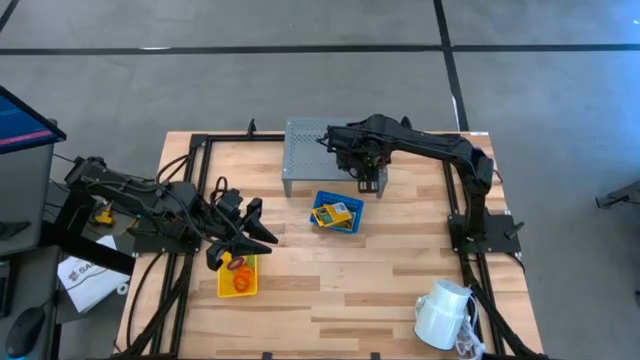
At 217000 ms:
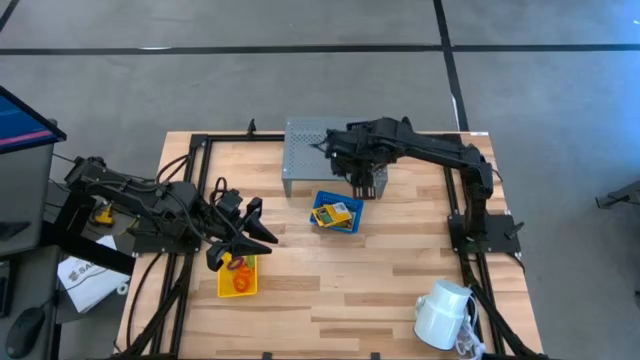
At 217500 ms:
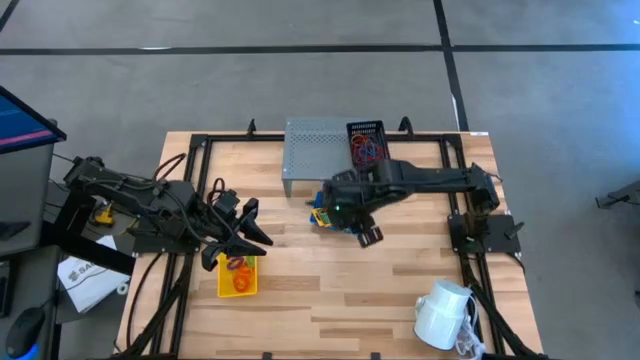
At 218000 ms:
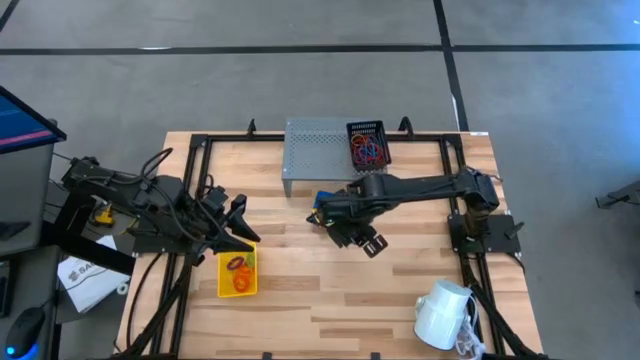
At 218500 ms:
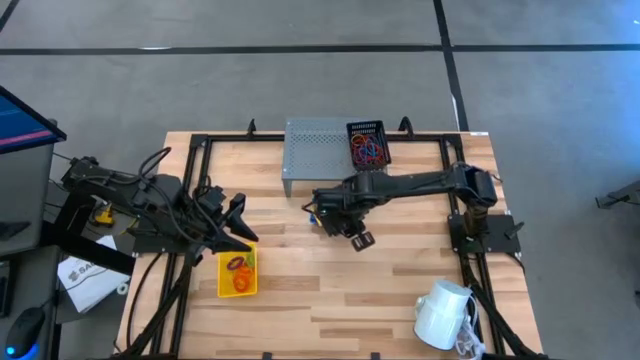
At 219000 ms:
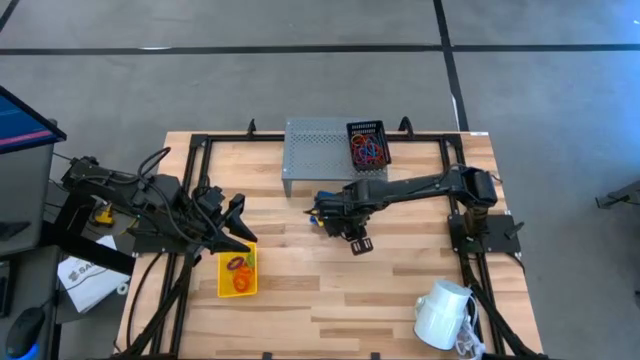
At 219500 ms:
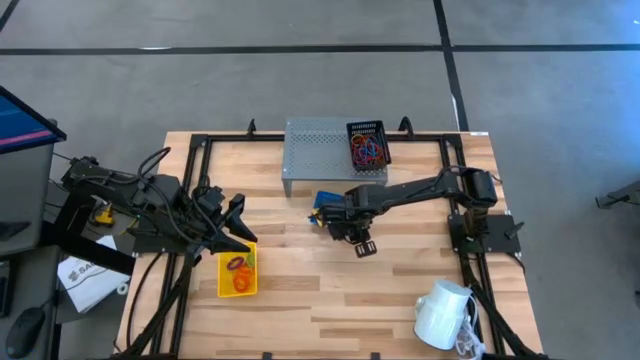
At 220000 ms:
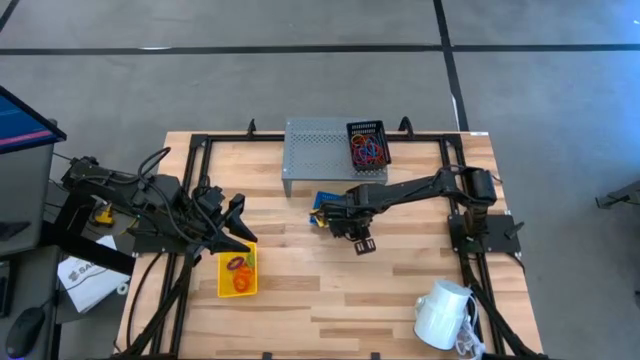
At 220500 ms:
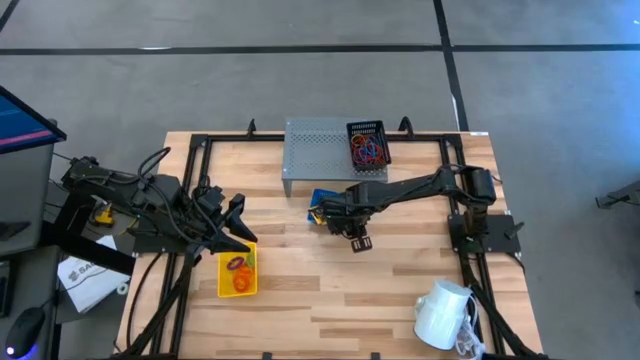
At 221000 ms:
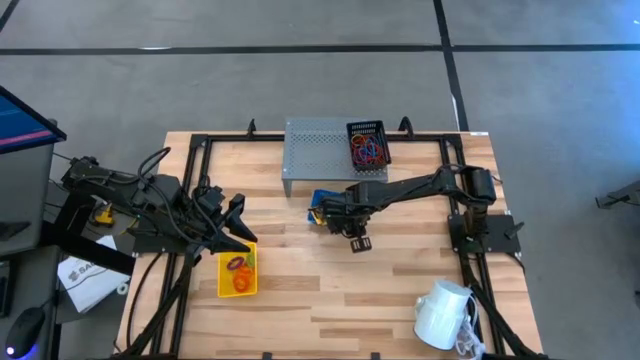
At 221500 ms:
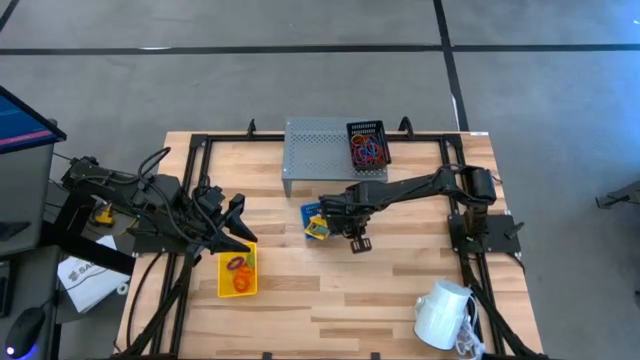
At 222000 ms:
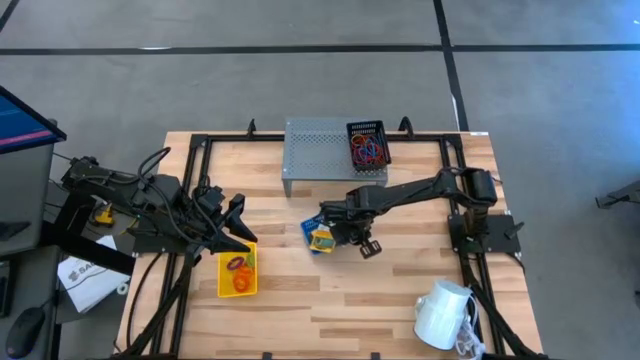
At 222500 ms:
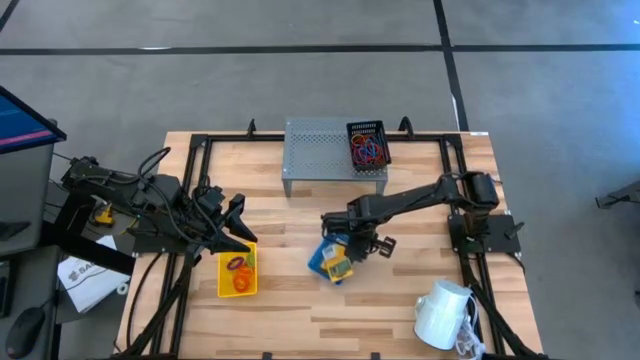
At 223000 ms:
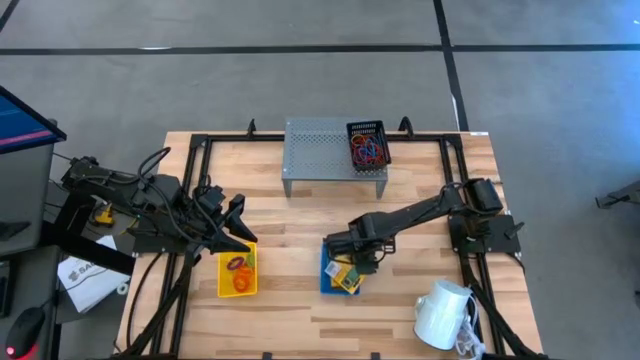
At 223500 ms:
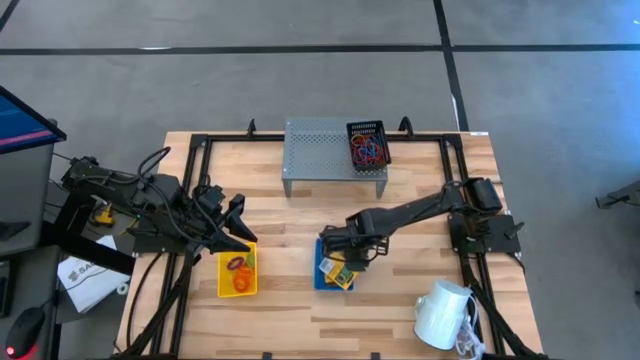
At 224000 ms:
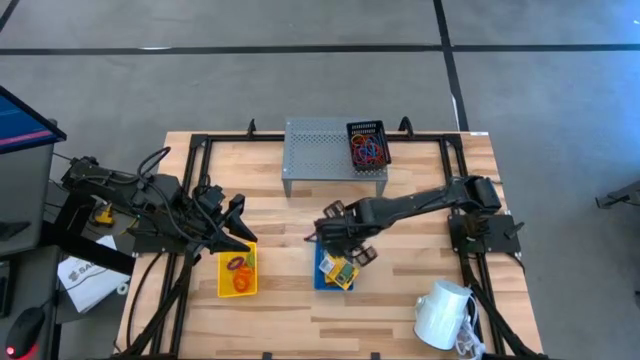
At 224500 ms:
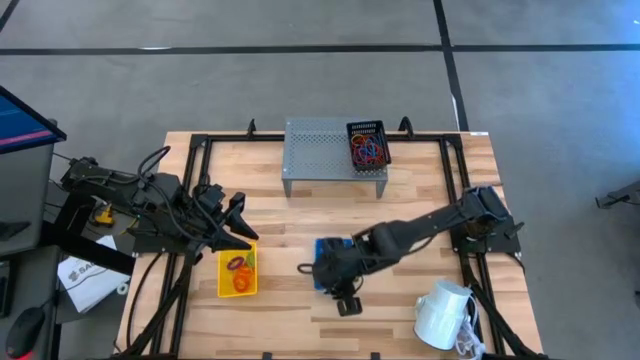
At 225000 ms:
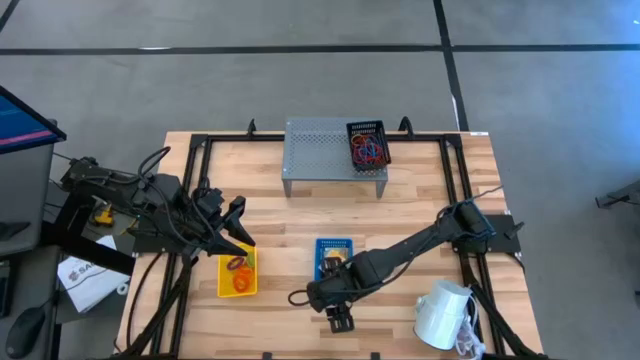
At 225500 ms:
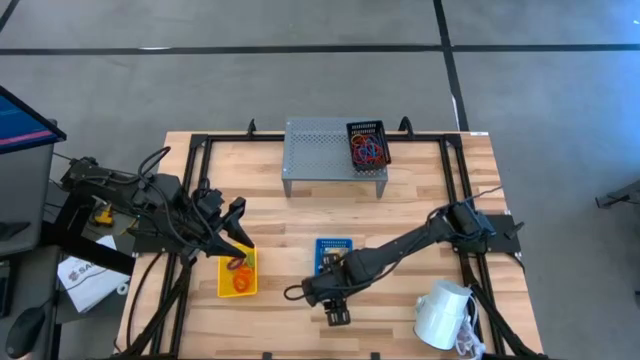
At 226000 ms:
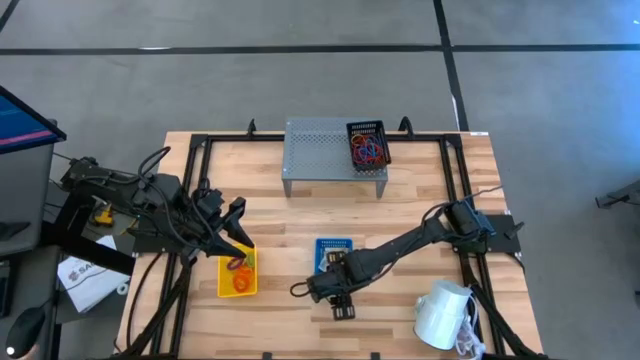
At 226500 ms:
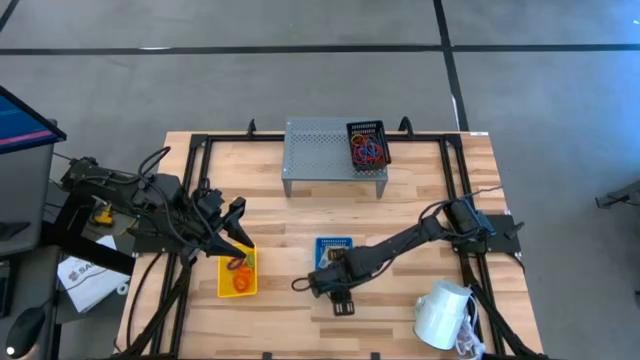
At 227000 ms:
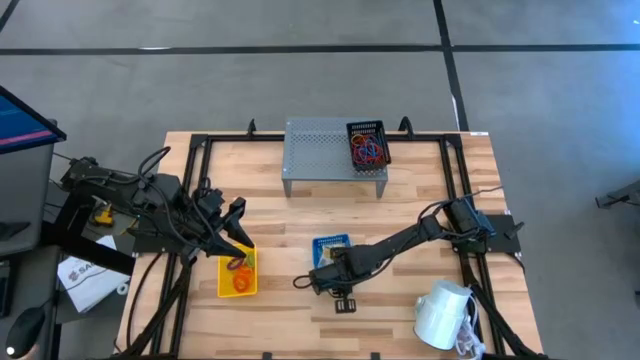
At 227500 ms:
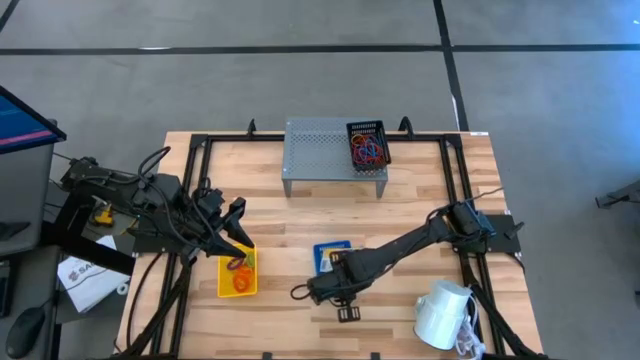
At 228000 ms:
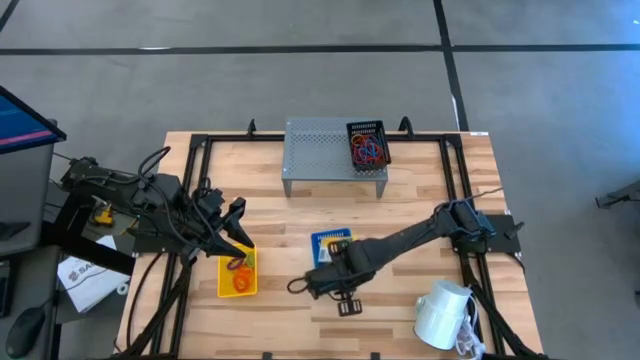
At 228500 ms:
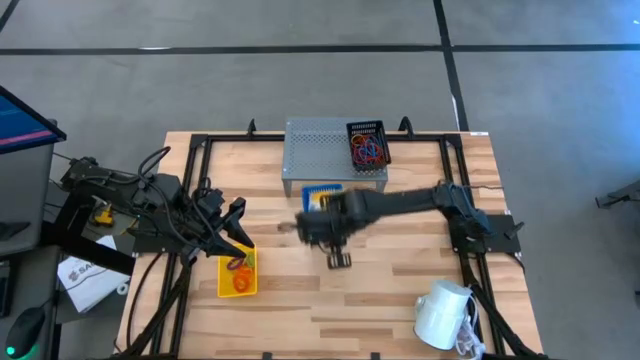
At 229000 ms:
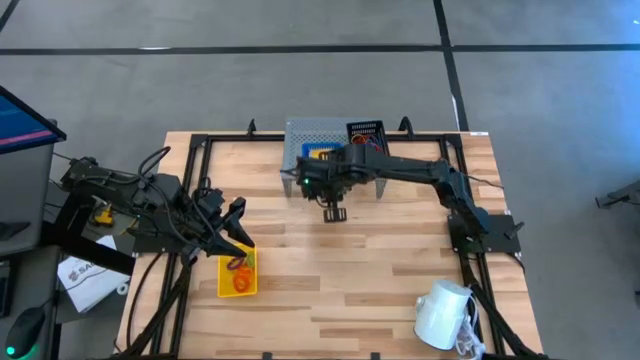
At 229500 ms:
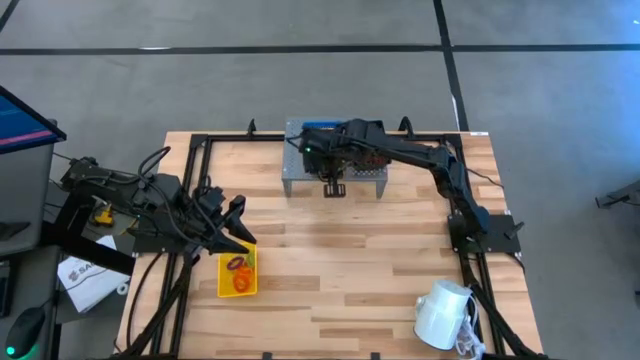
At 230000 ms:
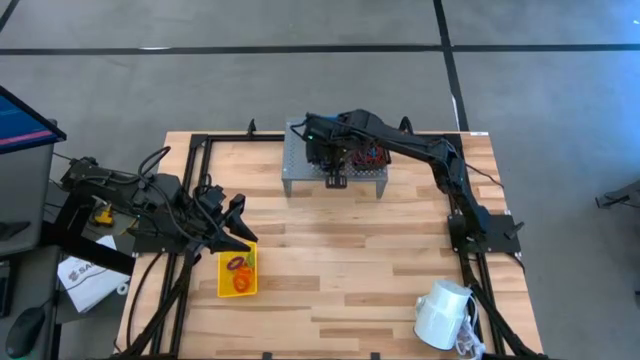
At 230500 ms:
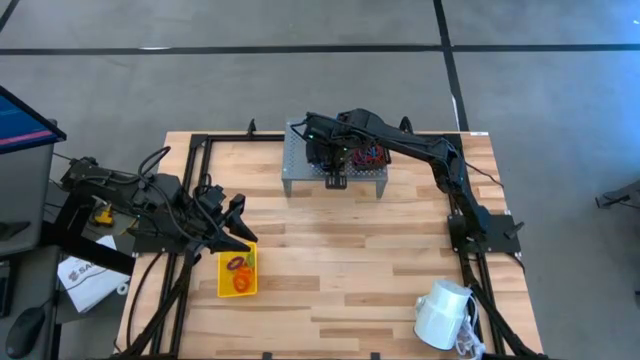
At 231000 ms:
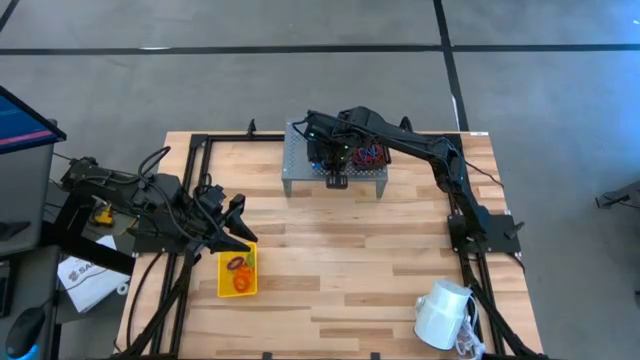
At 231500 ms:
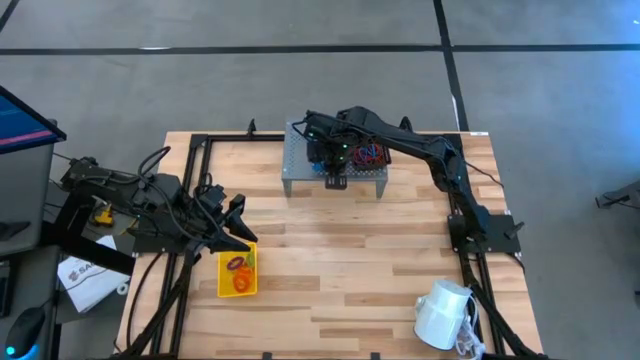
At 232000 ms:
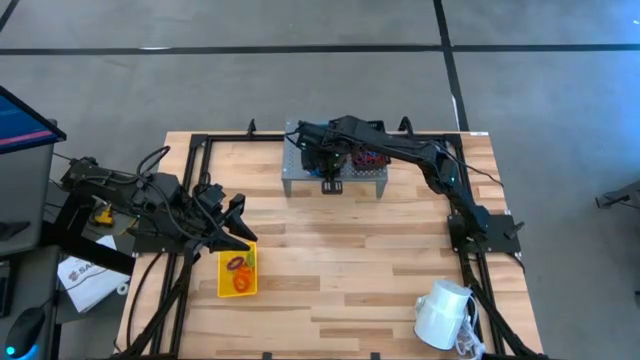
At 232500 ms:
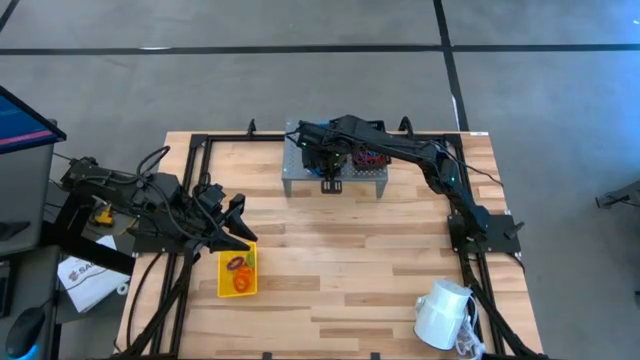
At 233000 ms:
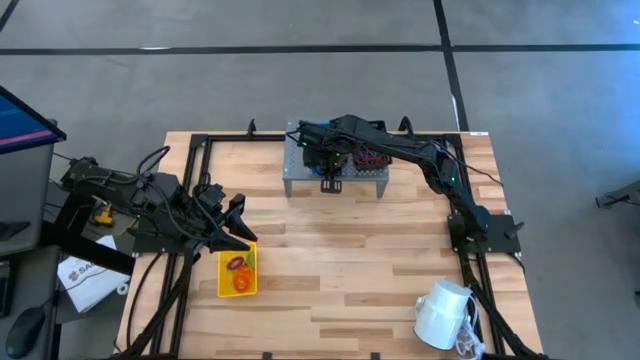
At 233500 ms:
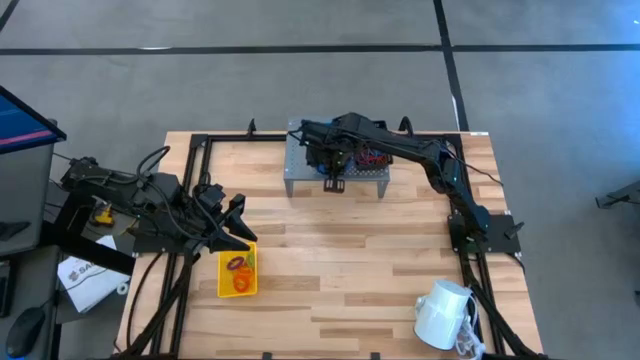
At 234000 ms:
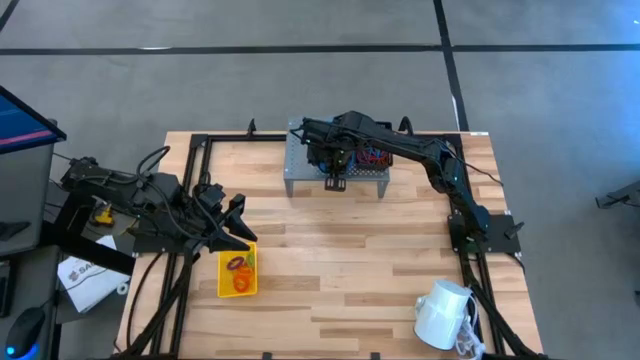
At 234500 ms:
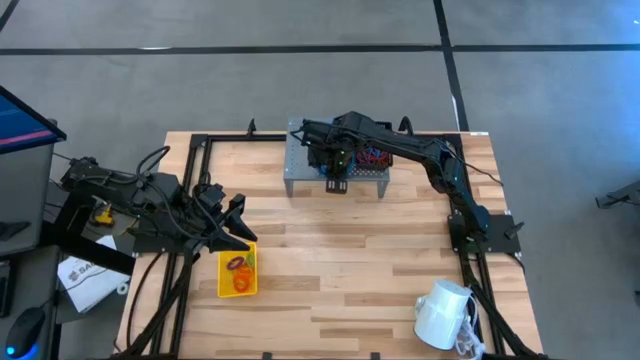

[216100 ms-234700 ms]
Task: Pick & Place Office Desk Supplies
Put the blue bin filled with crayon boxes on the shelf

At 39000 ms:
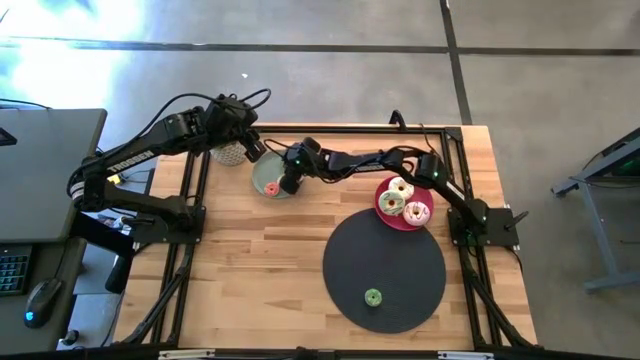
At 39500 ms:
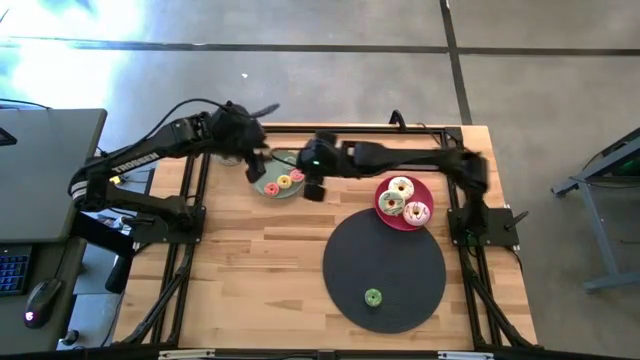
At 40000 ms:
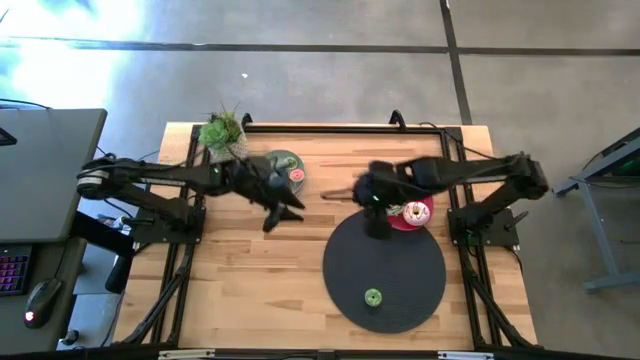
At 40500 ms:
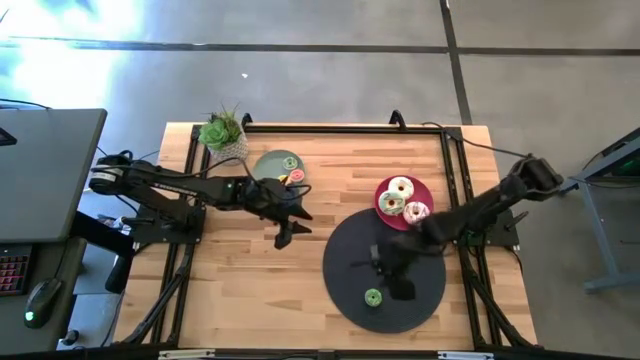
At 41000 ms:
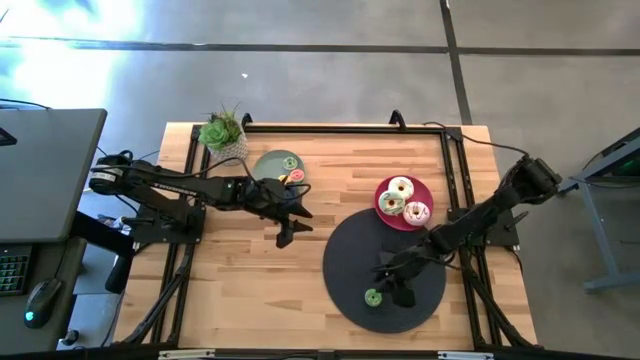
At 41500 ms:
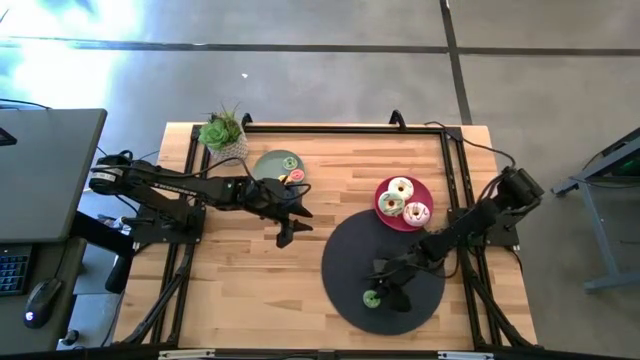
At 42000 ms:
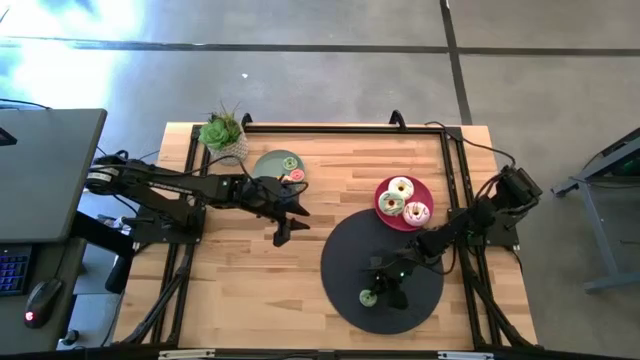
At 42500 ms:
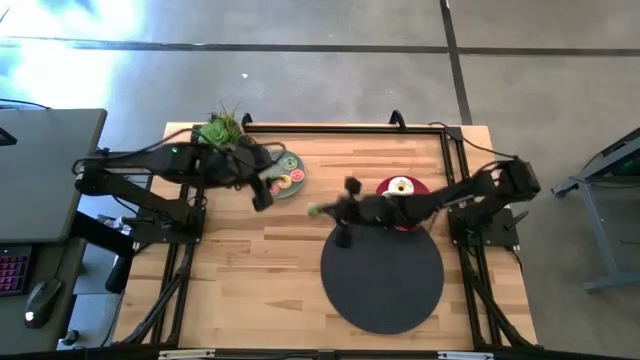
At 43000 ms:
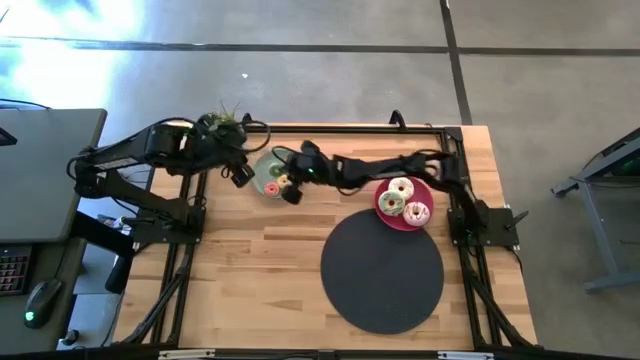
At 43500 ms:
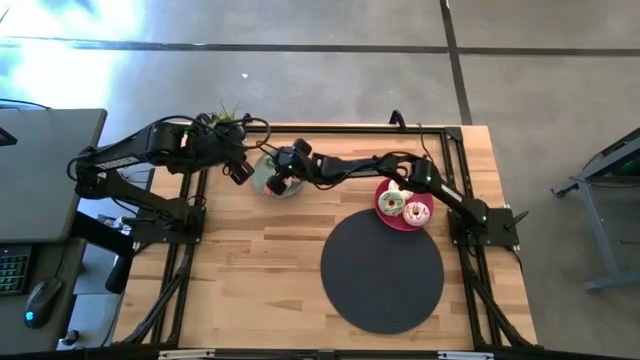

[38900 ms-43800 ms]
Task: Pick & Place donuts
Put the small green donut on the gray plate
